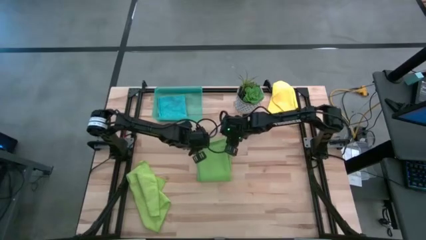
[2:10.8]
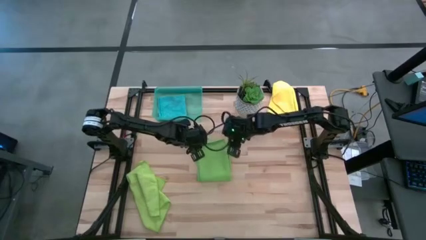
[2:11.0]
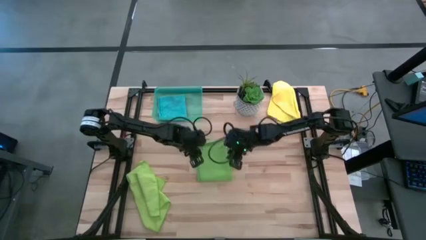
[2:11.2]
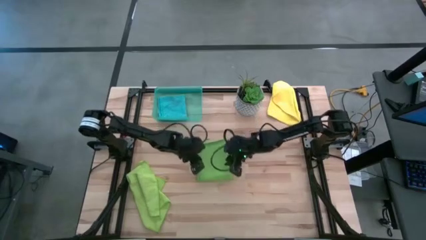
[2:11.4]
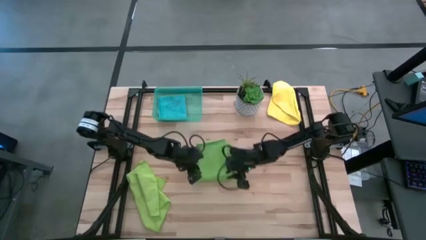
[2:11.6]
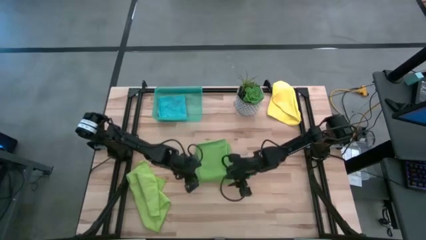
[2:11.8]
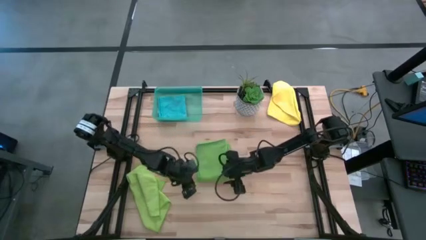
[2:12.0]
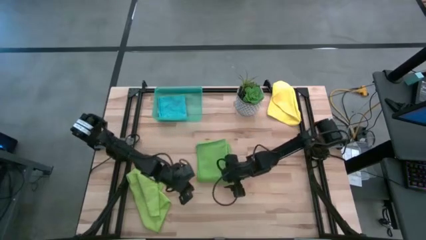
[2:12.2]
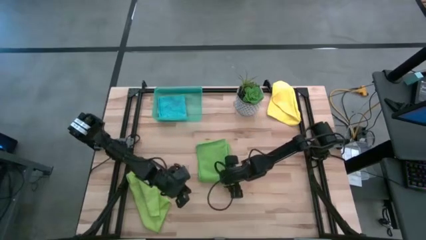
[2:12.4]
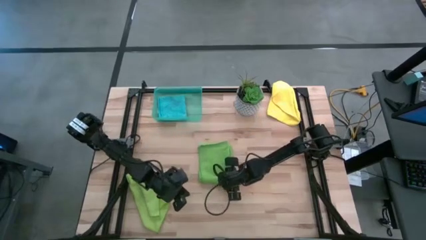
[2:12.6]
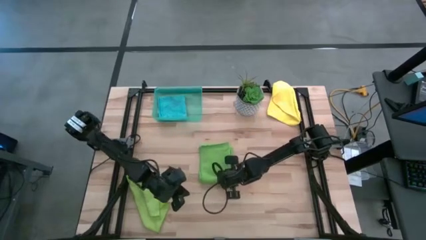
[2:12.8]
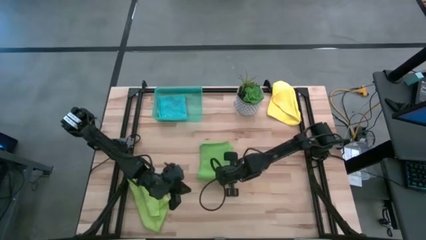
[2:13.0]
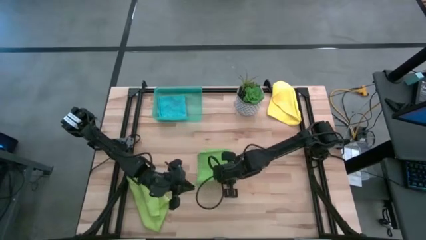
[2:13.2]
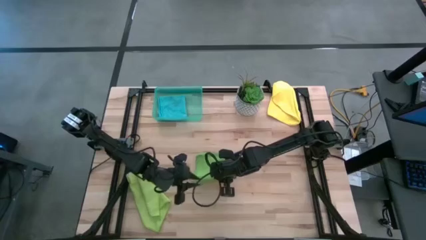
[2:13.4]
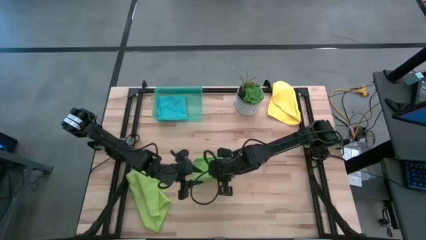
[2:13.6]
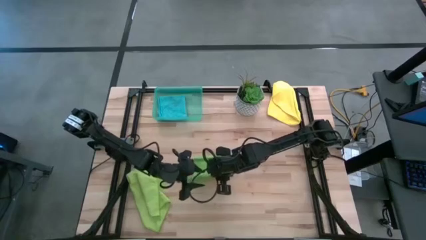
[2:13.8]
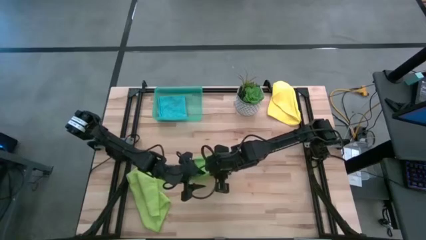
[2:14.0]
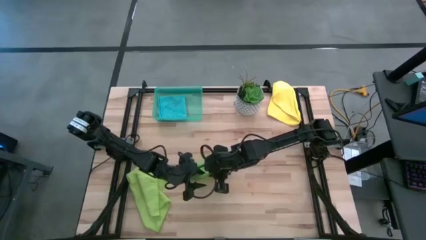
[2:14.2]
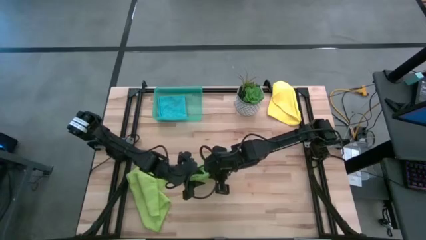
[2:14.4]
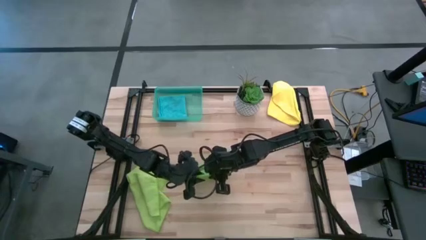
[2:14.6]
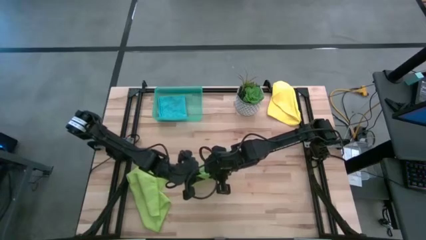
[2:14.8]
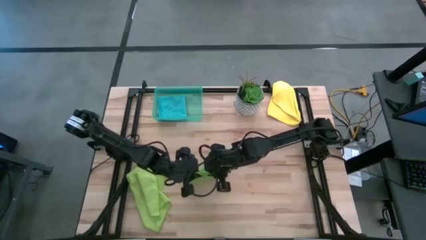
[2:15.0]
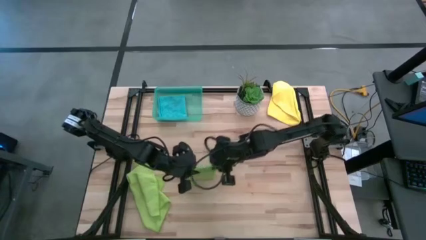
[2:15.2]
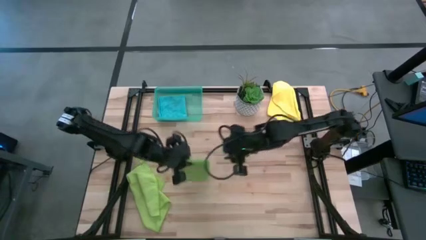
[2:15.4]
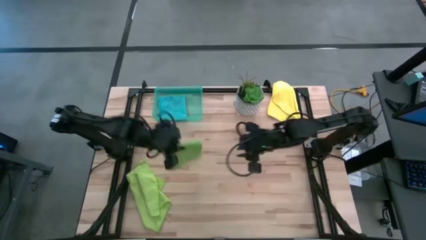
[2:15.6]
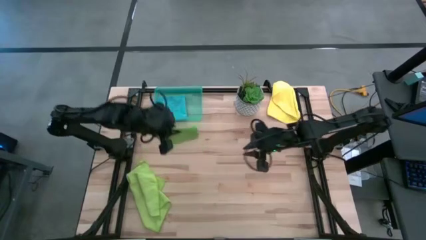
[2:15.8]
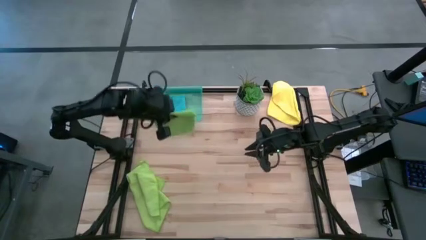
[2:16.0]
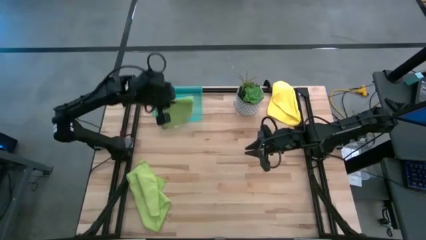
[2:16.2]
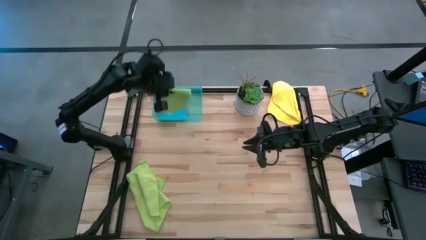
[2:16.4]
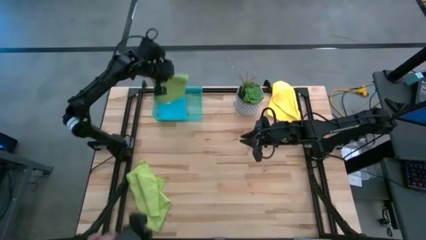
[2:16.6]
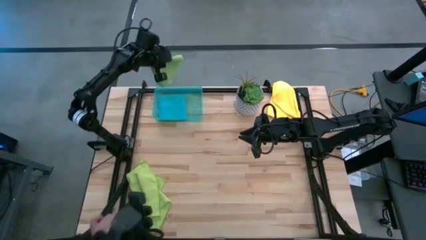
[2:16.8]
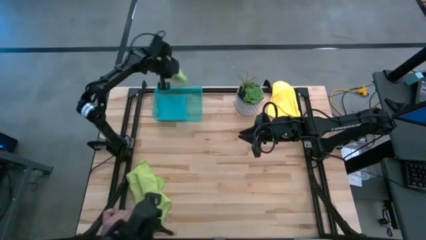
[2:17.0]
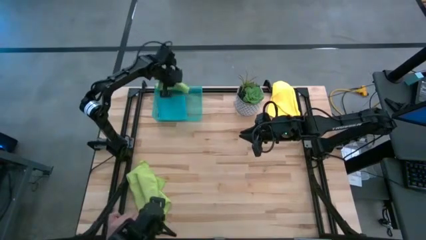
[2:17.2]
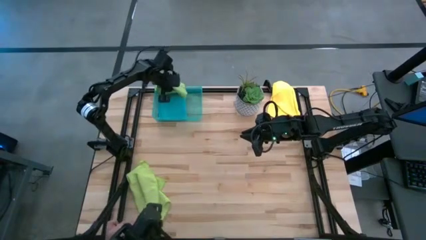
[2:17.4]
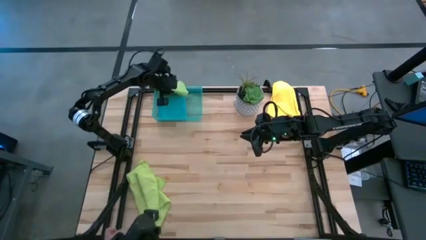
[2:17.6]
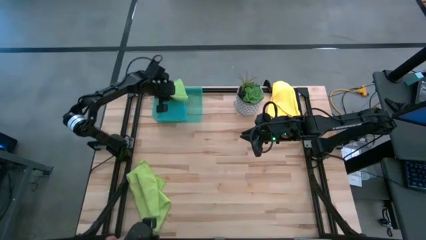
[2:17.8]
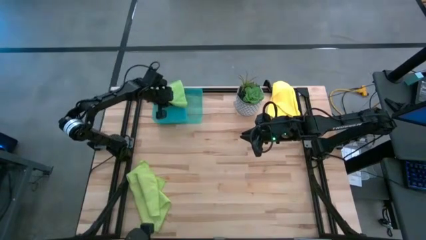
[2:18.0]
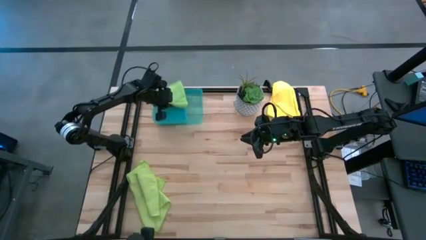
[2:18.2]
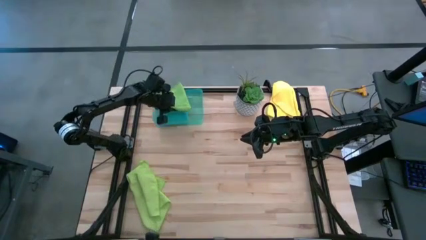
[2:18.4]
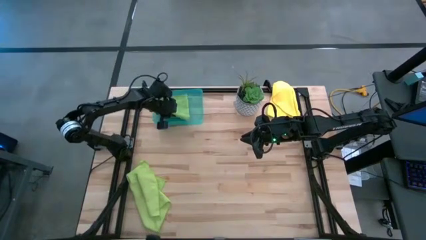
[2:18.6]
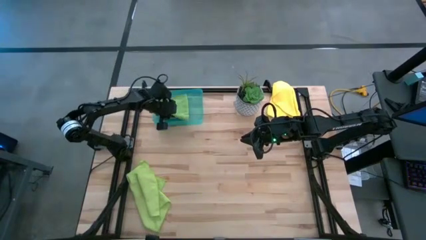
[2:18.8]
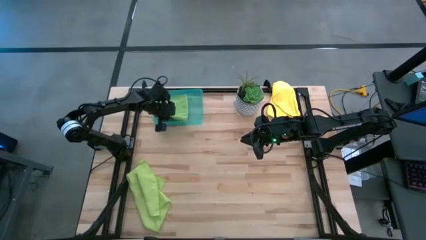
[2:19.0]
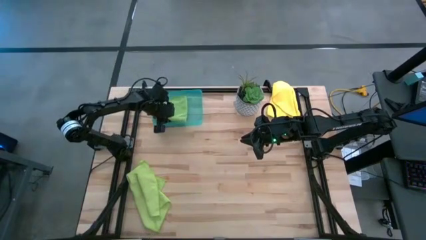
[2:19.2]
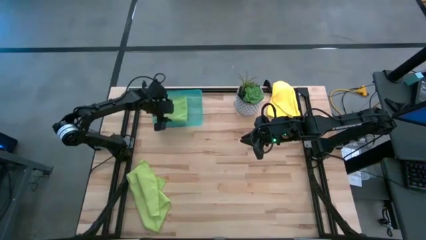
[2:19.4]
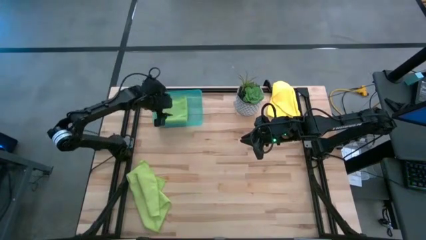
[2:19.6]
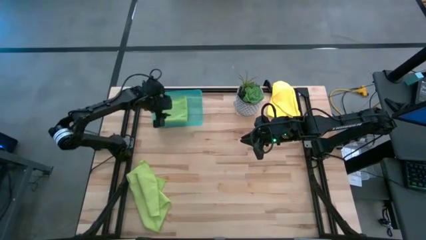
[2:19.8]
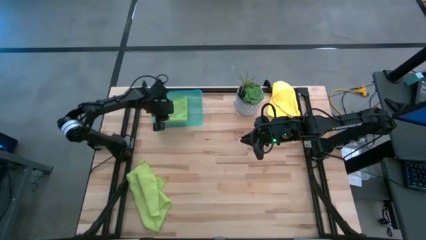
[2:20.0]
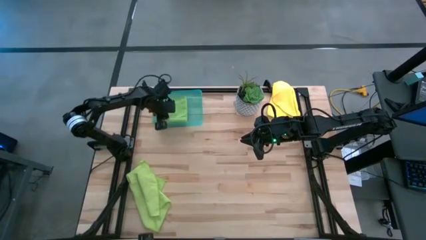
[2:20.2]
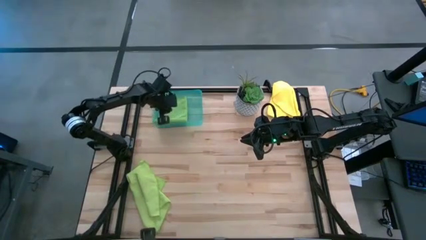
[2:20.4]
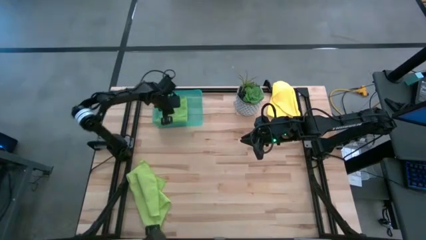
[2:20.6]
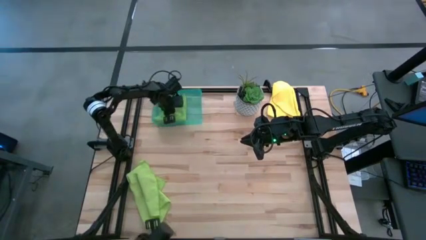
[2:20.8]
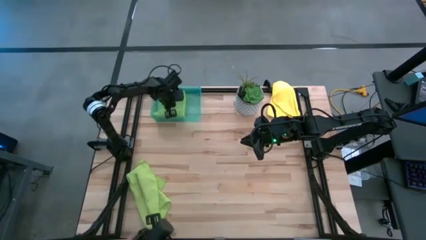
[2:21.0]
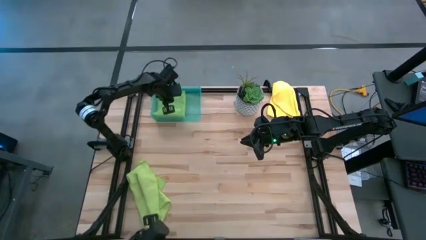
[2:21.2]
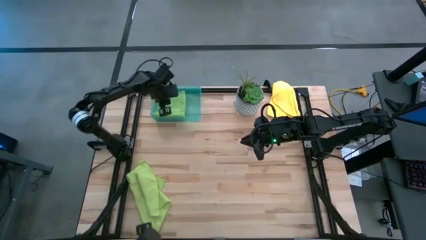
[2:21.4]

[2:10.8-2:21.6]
Task: Fold microfiber towels
Put the green microfiber cloth into the blue bin

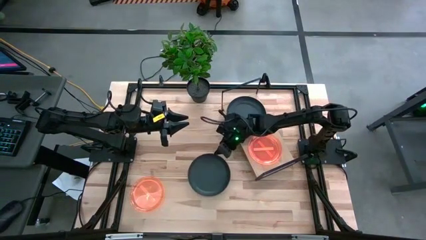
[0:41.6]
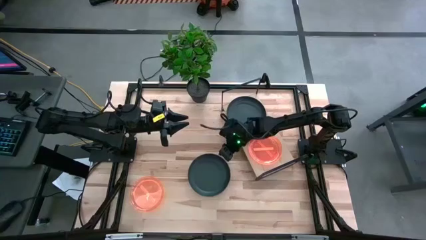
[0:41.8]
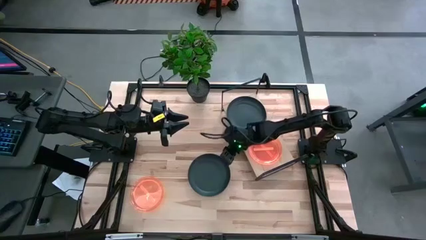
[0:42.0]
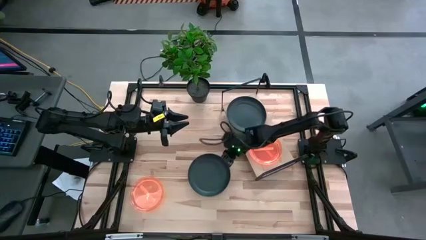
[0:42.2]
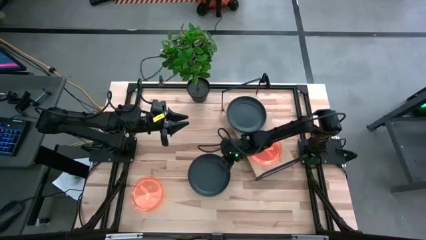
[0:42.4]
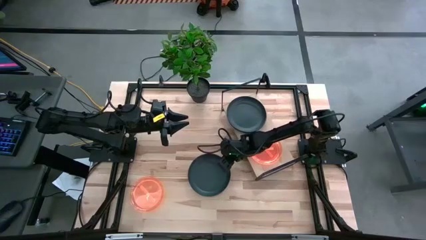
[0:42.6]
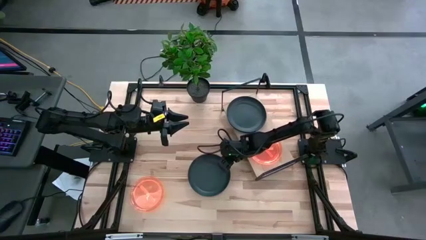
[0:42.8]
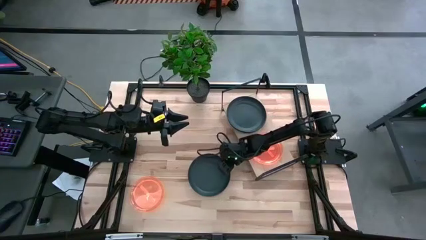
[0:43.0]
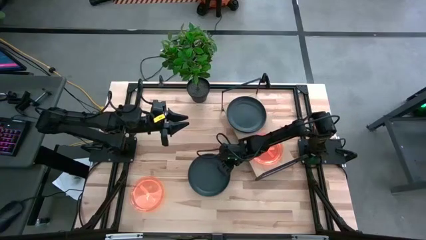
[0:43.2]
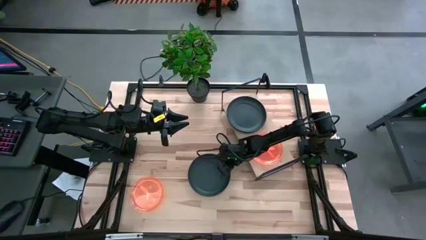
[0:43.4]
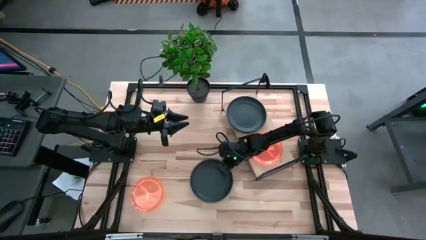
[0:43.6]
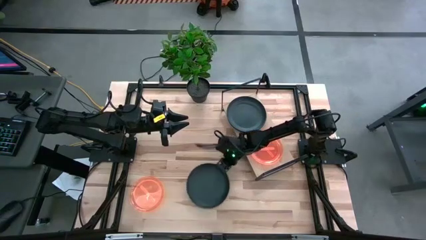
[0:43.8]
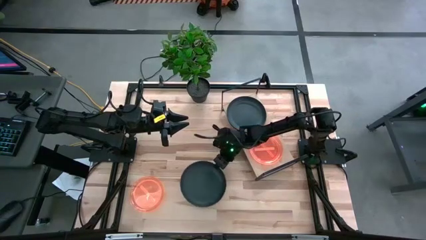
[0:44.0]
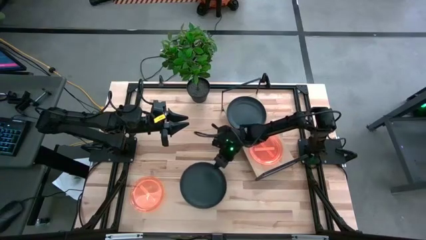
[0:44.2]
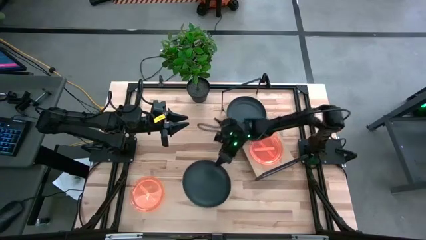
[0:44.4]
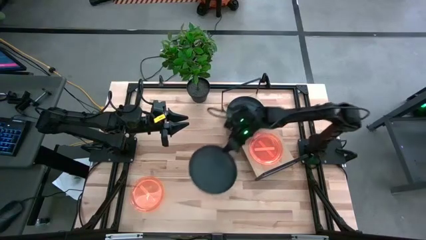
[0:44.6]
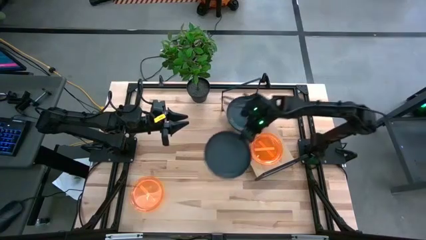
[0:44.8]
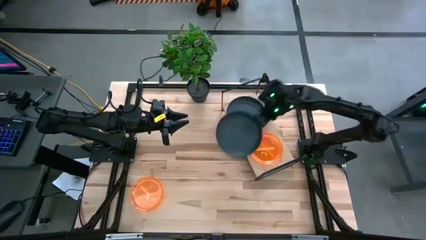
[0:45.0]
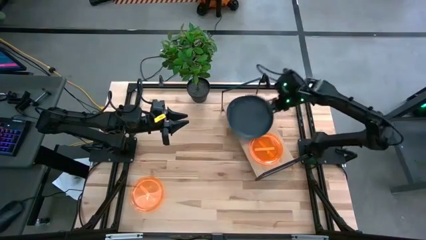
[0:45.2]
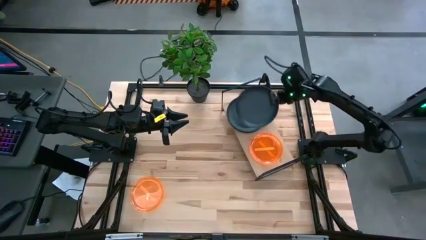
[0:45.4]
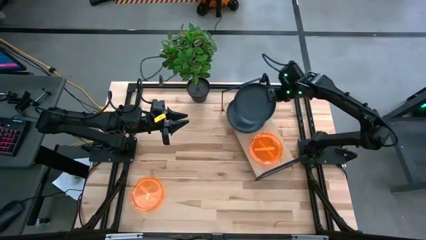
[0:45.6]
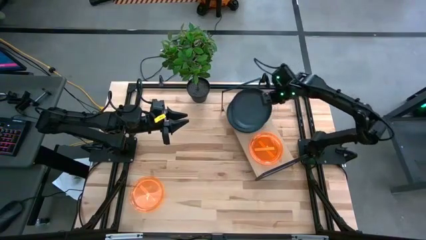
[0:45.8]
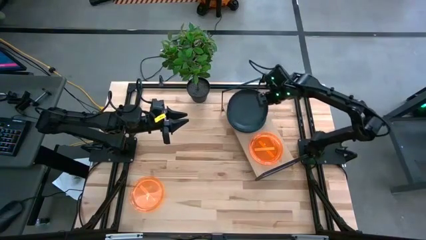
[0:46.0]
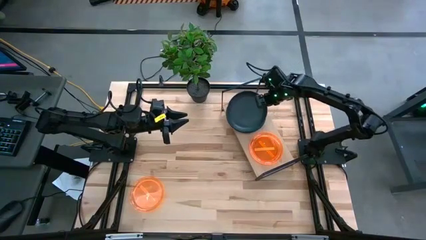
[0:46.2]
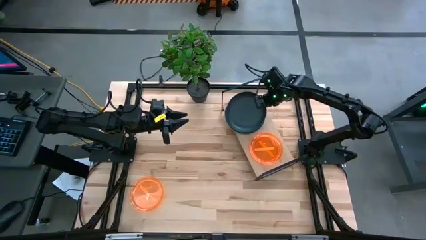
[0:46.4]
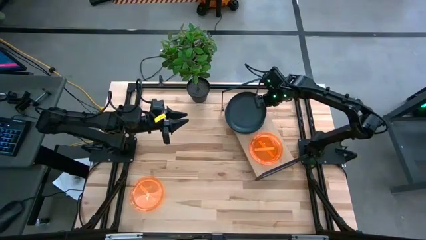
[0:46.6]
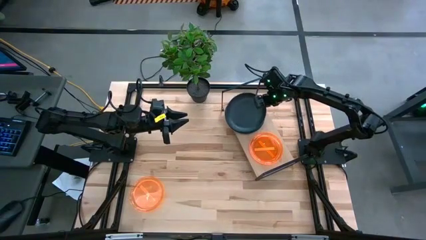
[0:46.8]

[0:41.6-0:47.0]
Task: Place and stack plates onto a shelf
Stack the black plate on top the stacked black plates on the shelf
